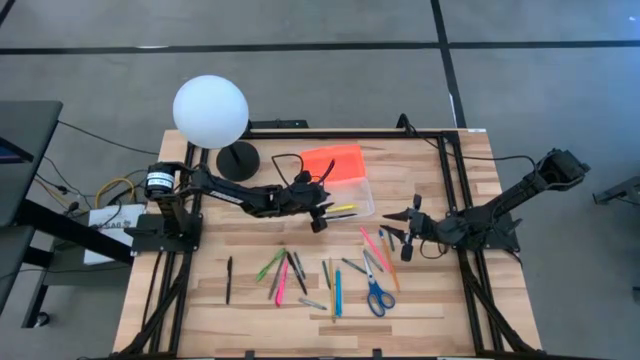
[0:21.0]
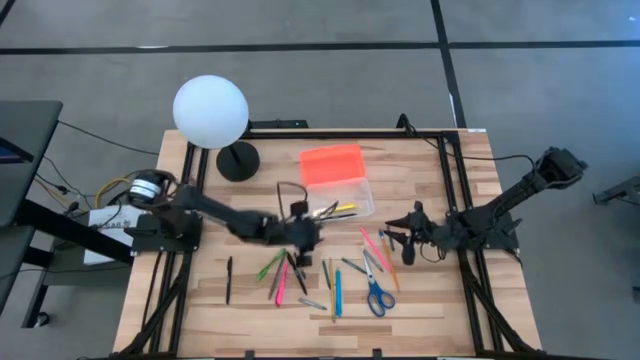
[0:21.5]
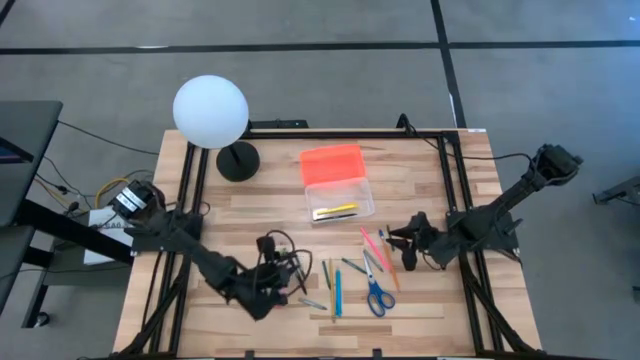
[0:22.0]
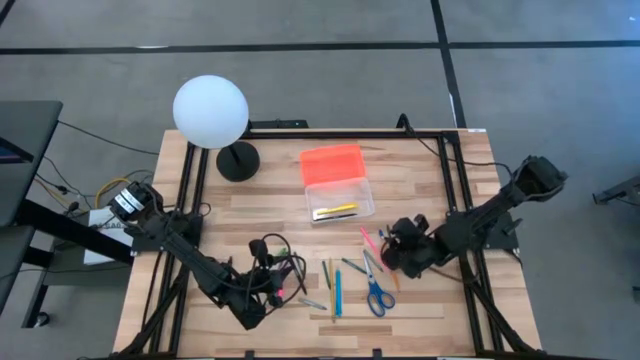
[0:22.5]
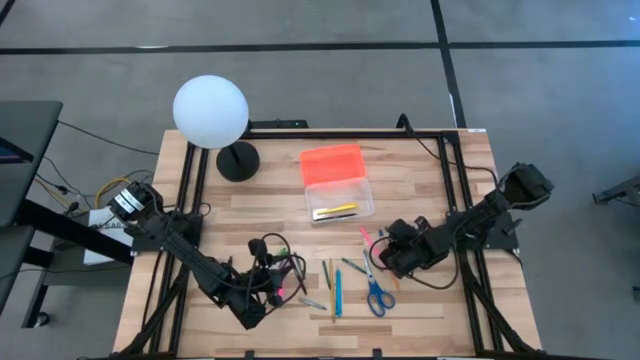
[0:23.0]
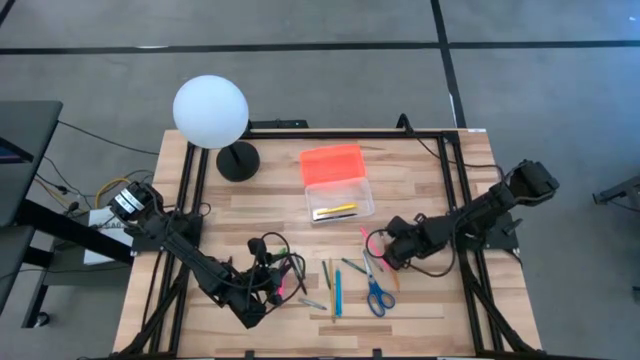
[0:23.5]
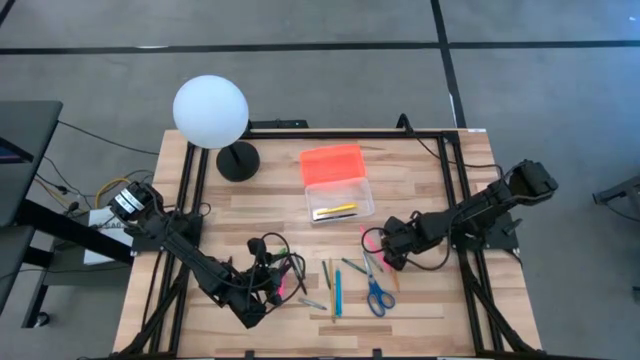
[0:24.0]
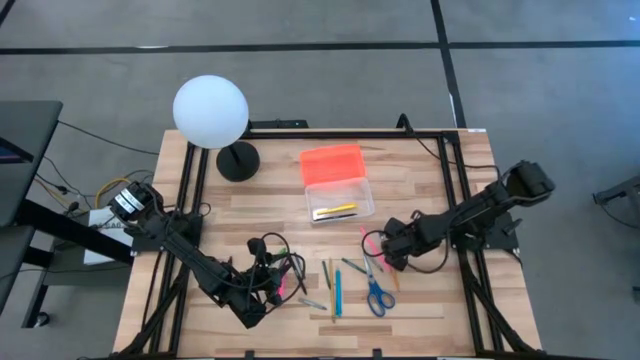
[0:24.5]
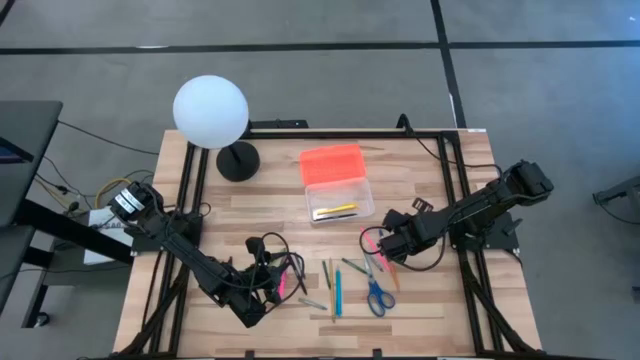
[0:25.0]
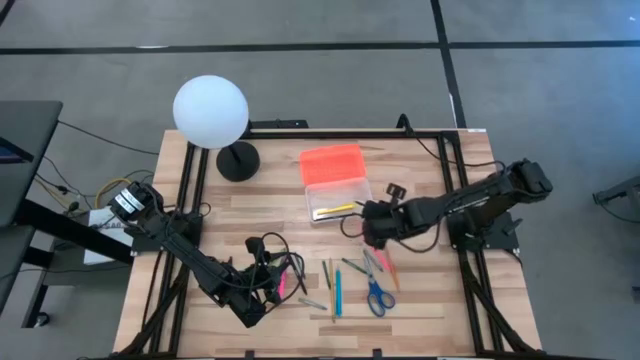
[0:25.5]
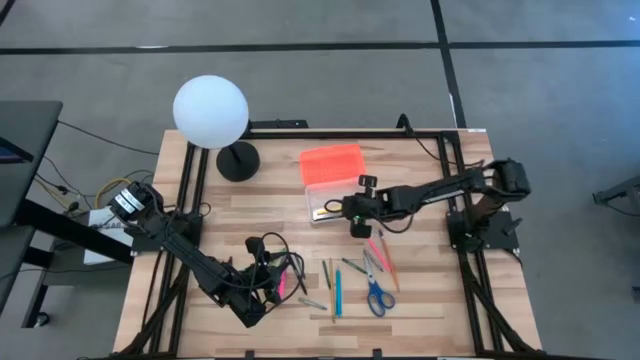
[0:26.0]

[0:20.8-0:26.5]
Task: Pick & place school supplies into a supply box
Put the green crayon into the orange supply box

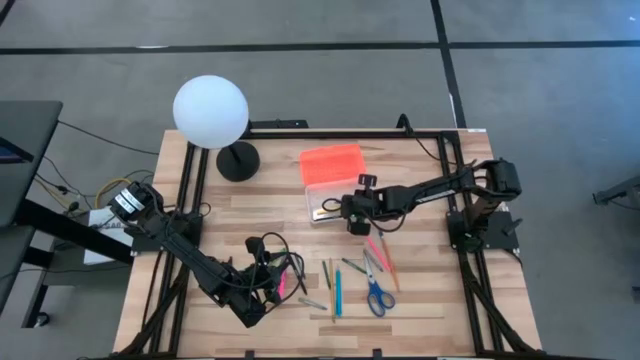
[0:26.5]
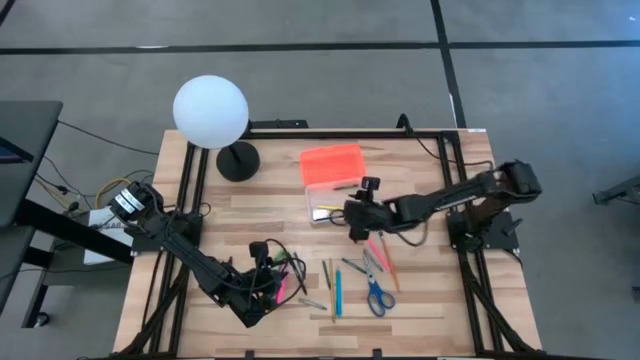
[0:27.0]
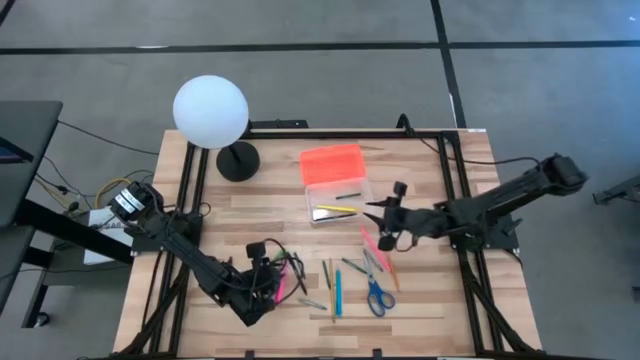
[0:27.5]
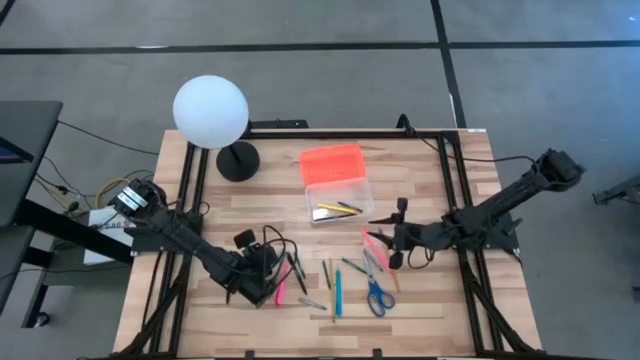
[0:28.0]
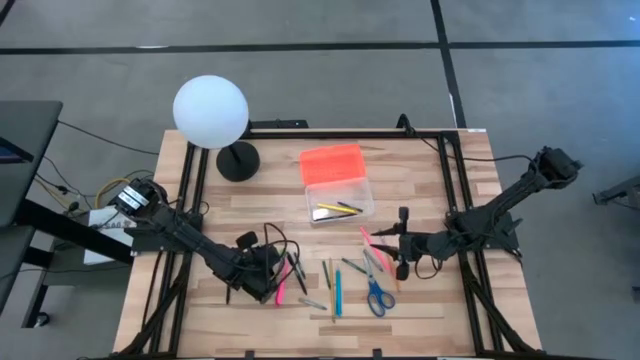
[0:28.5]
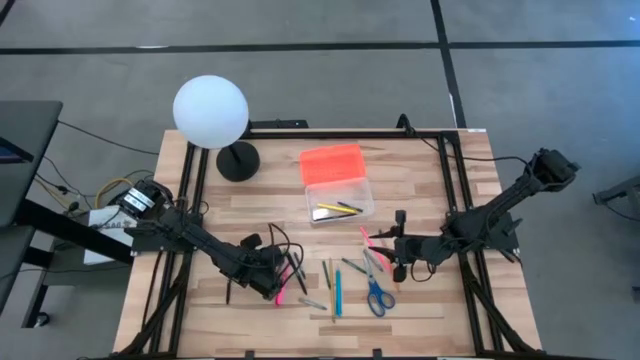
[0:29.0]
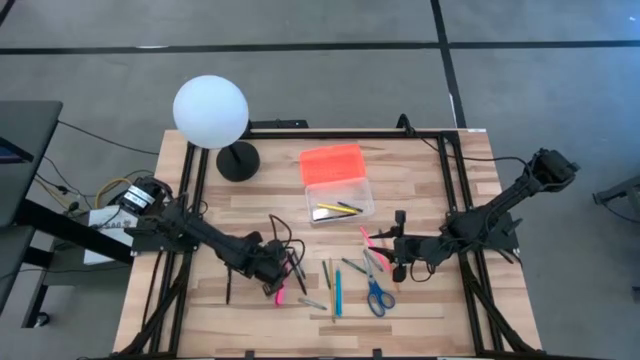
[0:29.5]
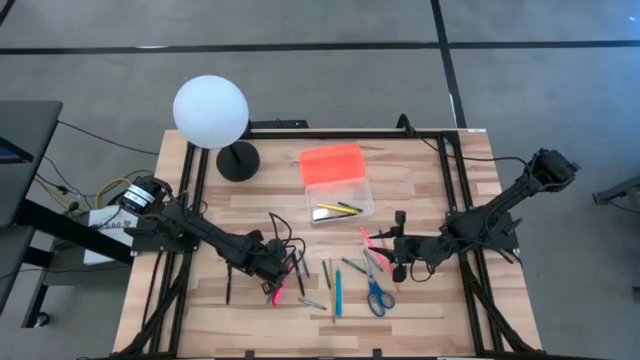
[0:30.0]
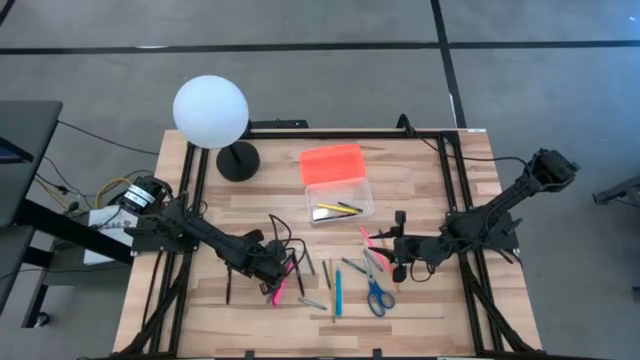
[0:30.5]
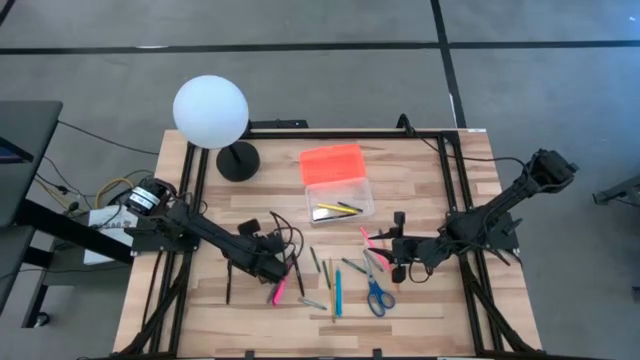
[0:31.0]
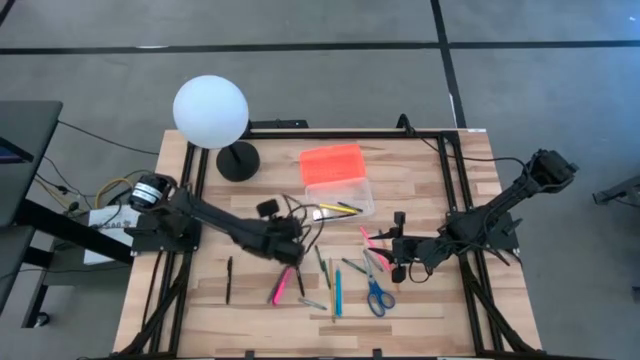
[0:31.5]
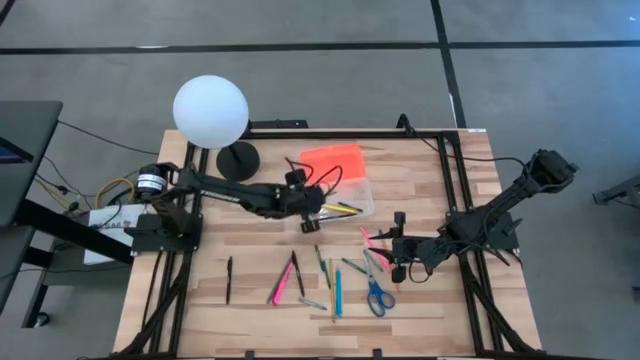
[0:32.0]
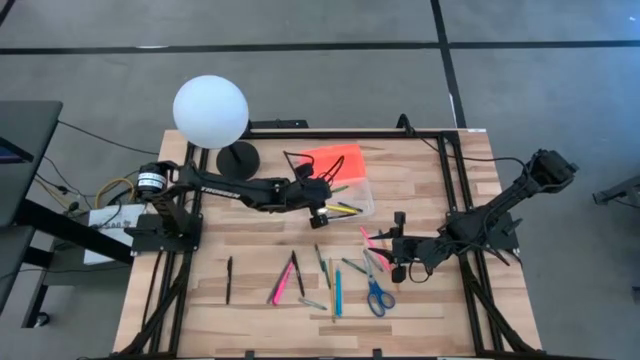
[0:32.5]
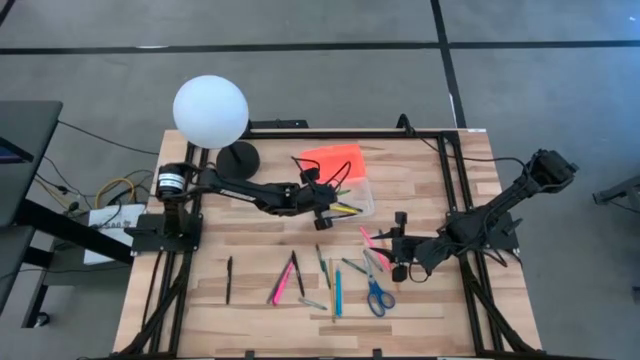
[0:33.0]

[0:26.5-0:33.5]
Put the green pen into the orange supply box

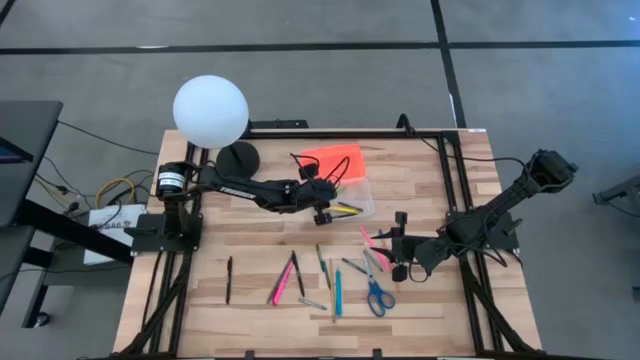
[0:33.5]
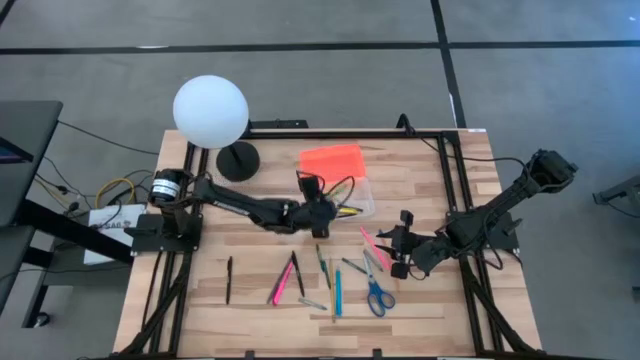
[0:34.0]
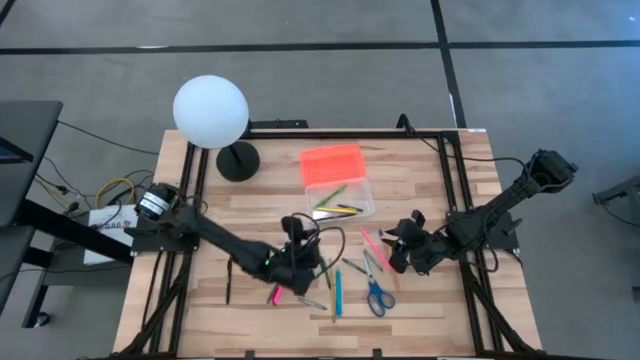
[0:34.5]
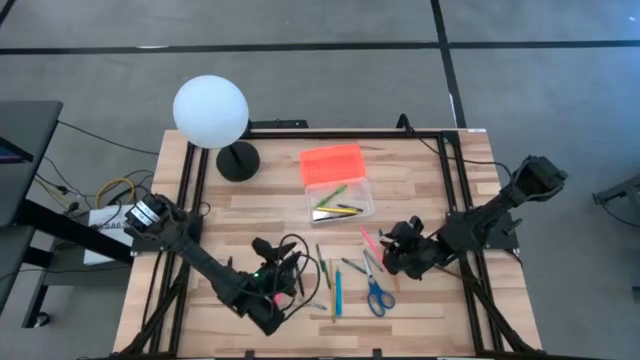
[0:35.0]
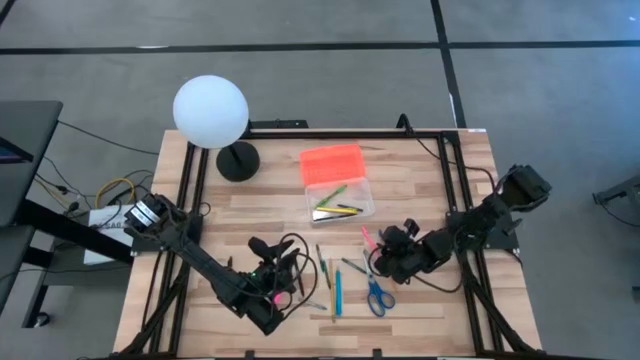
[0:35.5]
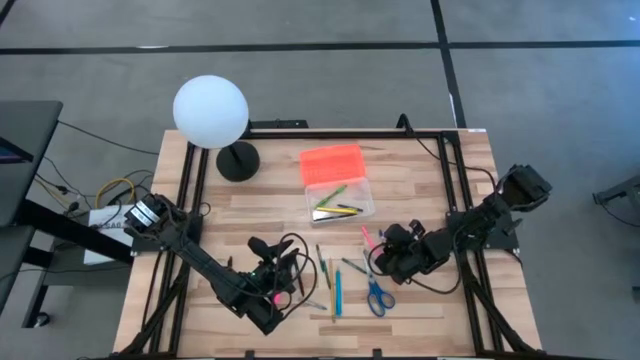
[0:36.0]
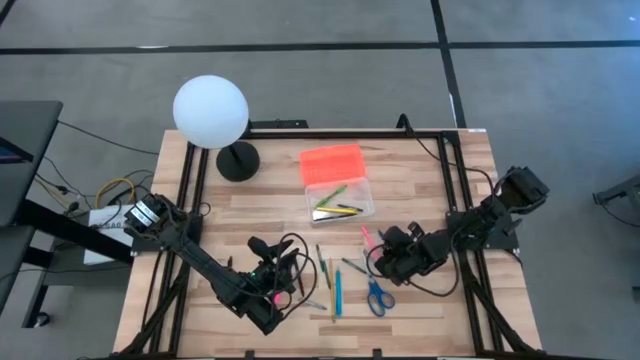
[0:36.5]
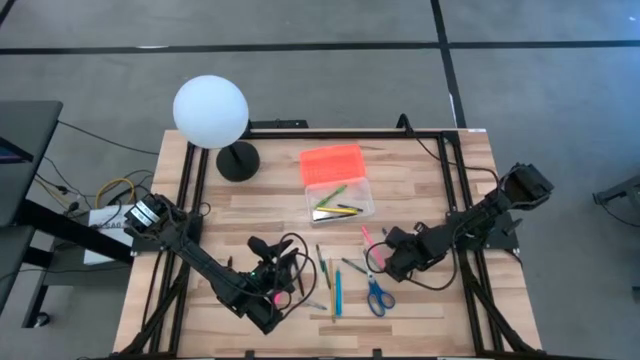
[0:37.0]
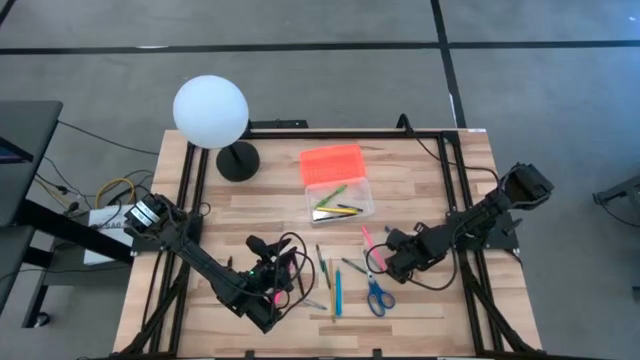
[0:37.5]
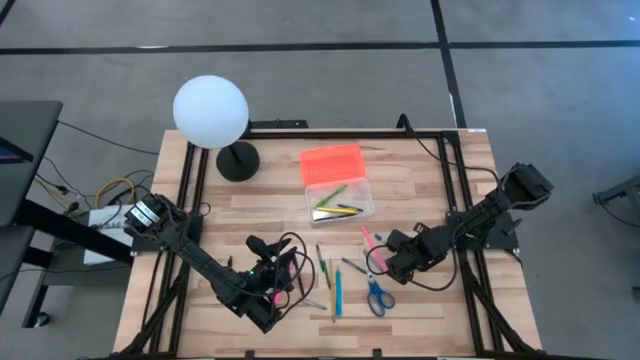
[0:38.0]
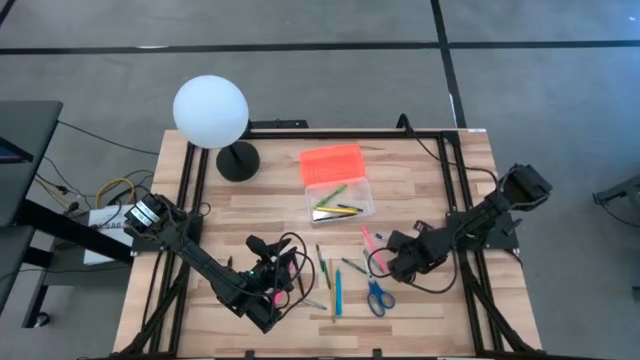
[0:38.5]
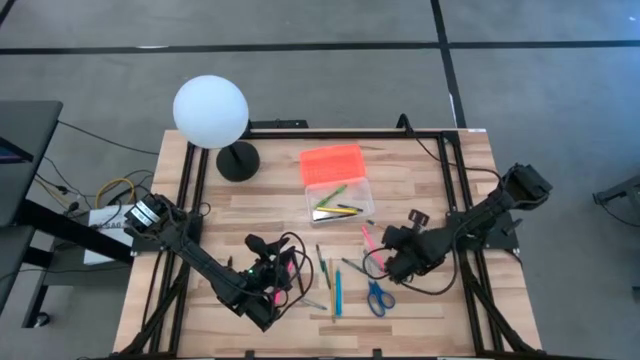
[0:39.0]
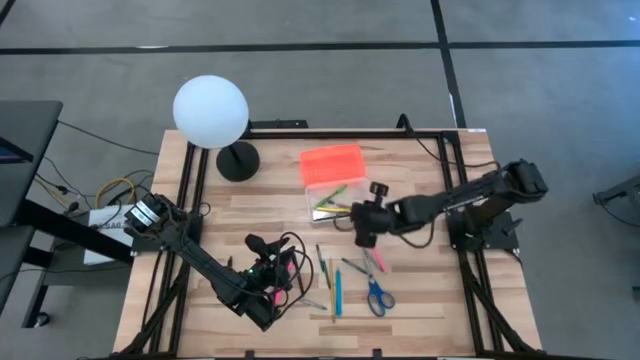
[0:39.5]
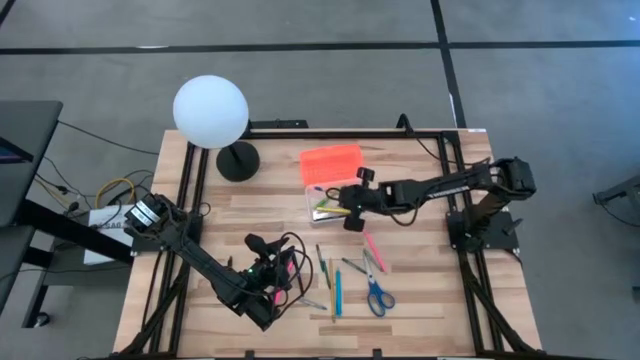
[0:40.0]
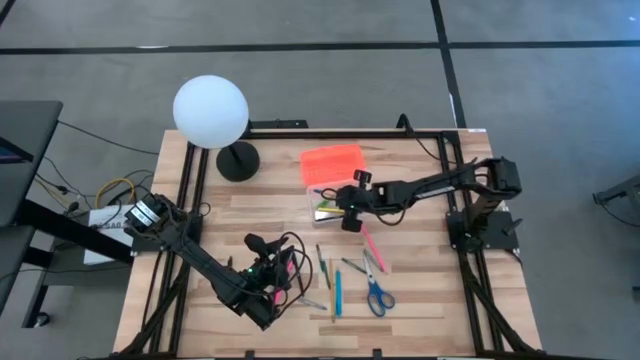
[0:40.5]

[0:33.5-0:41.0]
Put the orange pencil into the orange supply box

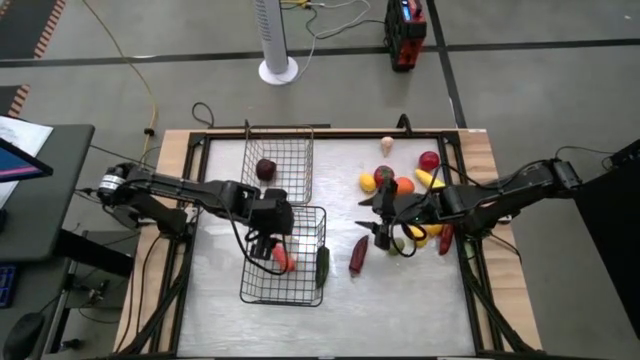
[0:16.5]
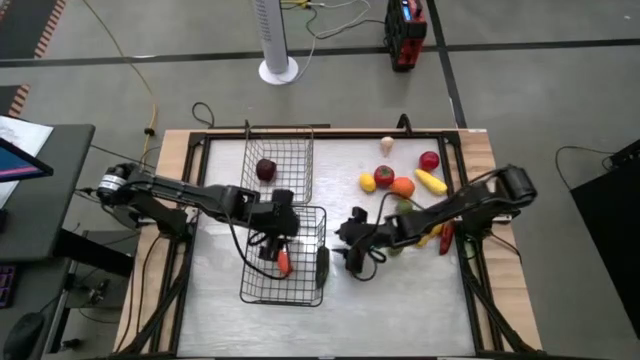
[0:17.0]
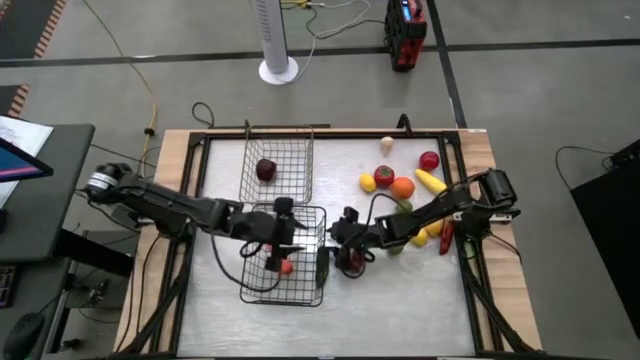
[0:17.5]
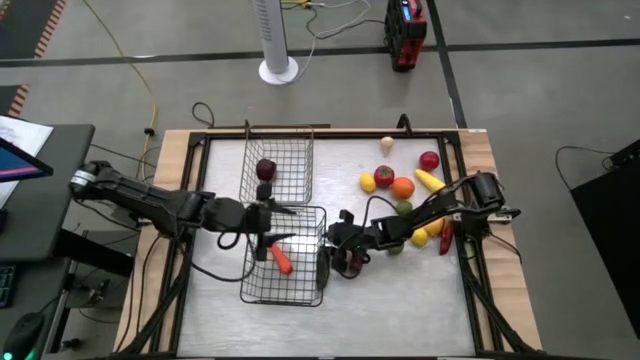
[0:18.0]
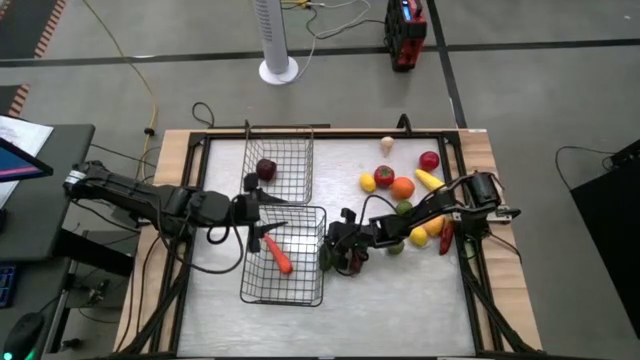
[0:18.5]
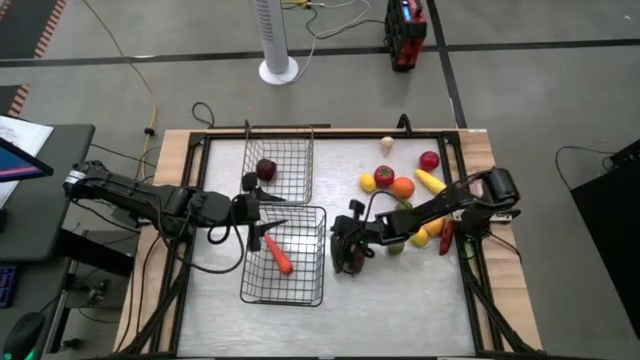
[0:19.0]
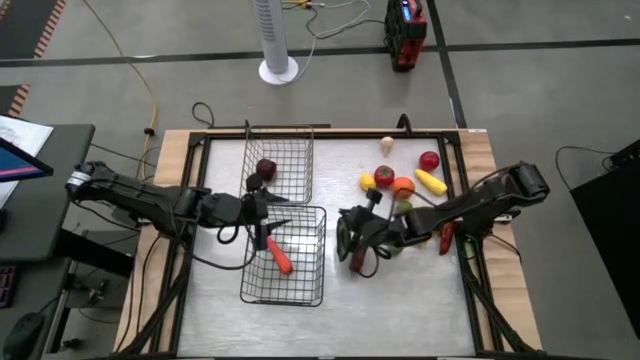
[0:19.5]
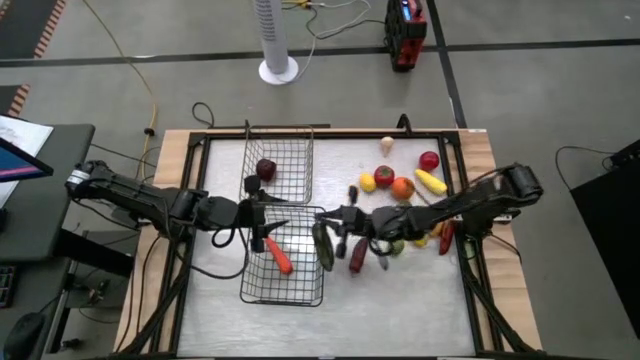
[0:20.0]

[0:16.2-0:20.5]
Task: Sort produce into baskets
Put the green chili pepper into the black wire basket
